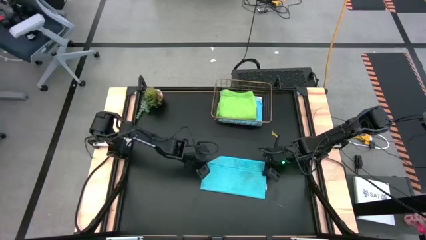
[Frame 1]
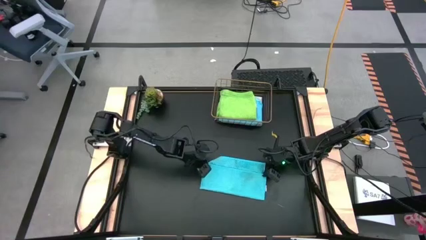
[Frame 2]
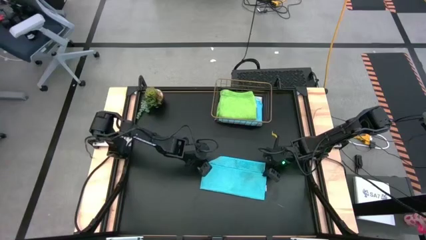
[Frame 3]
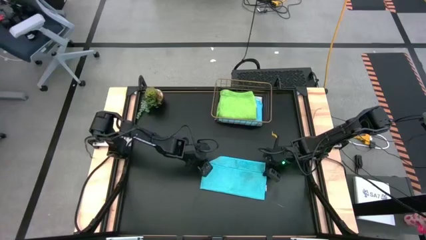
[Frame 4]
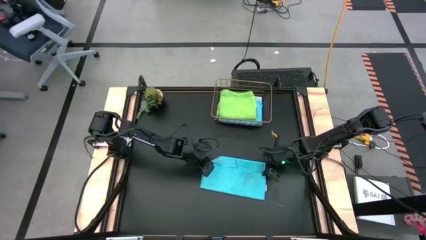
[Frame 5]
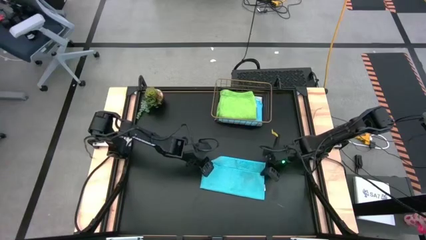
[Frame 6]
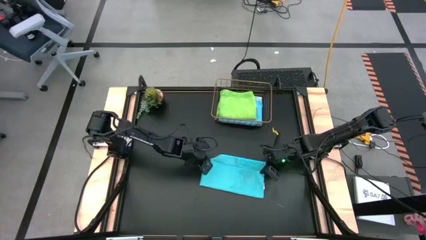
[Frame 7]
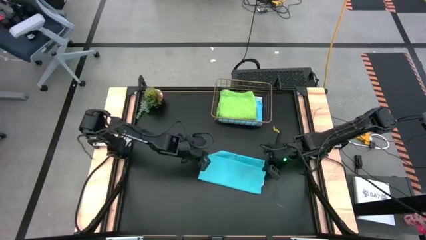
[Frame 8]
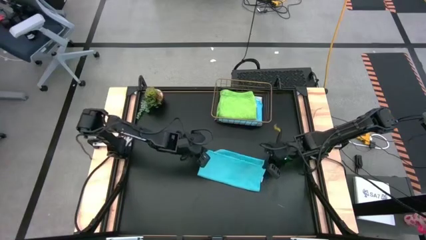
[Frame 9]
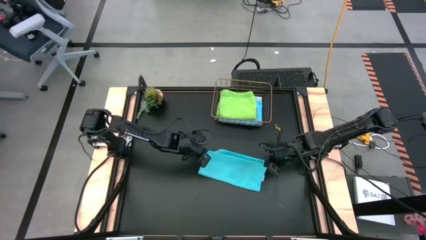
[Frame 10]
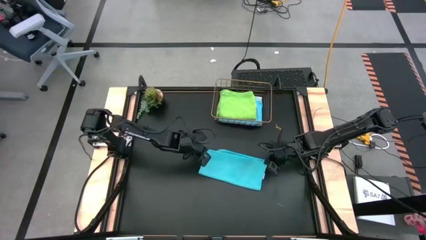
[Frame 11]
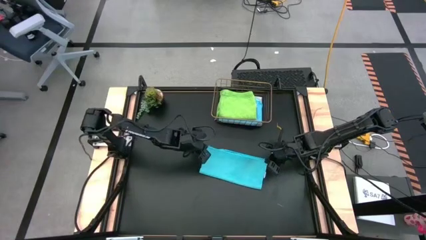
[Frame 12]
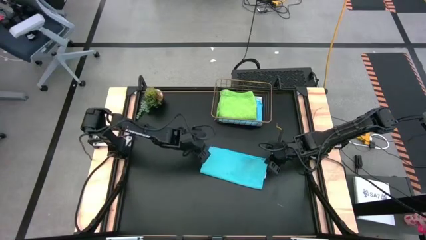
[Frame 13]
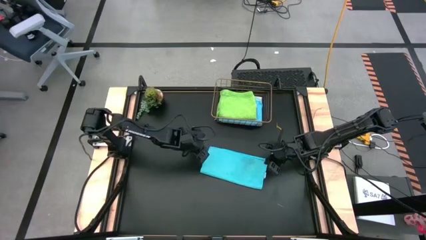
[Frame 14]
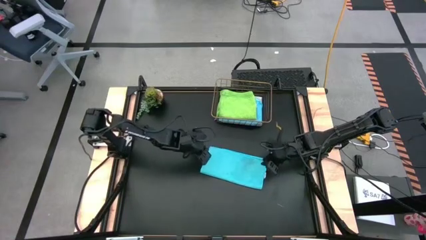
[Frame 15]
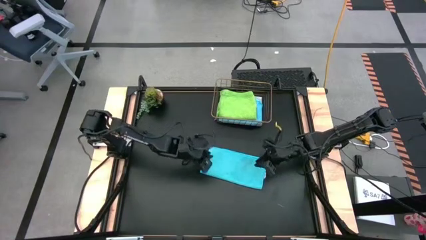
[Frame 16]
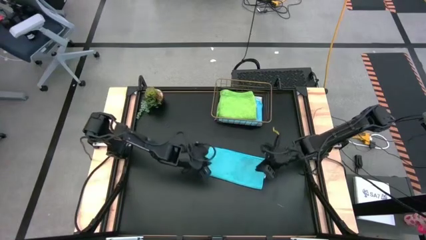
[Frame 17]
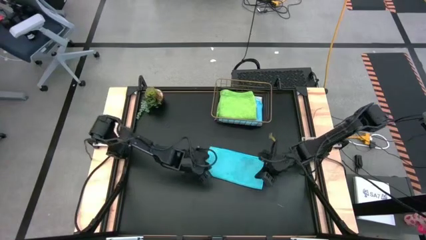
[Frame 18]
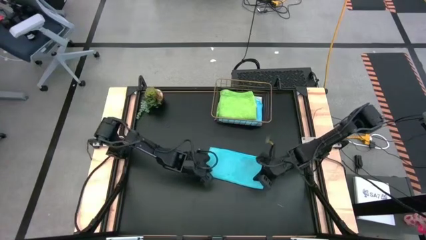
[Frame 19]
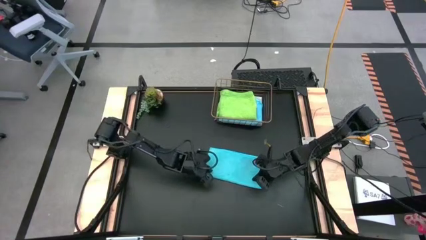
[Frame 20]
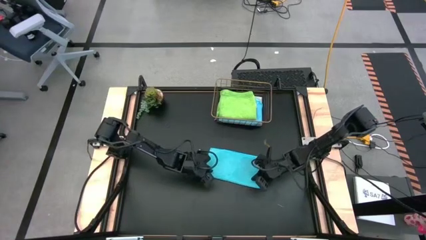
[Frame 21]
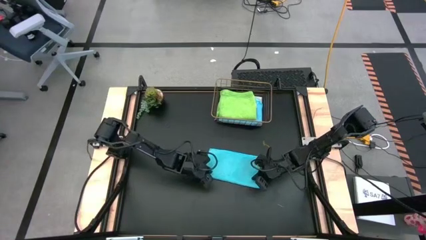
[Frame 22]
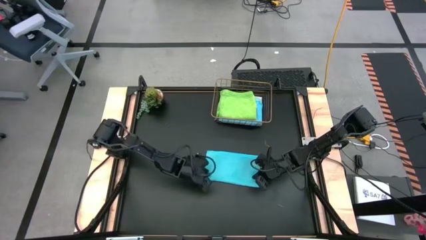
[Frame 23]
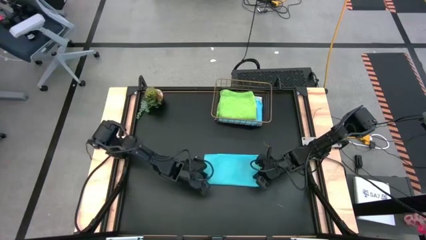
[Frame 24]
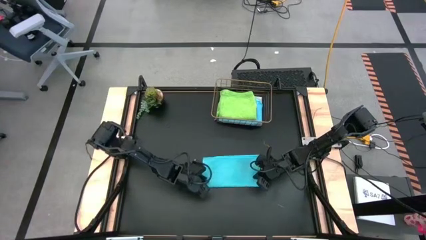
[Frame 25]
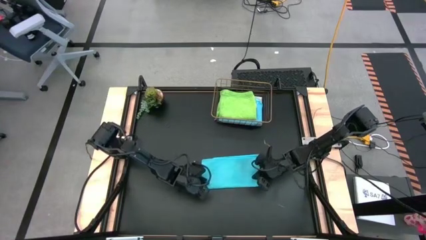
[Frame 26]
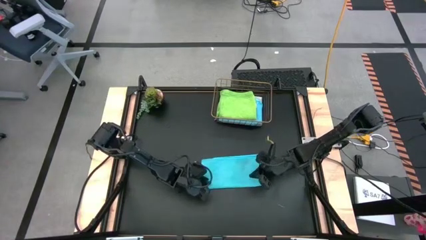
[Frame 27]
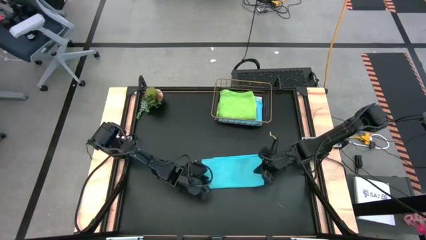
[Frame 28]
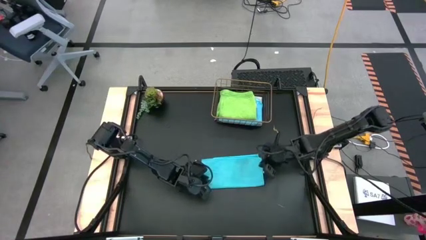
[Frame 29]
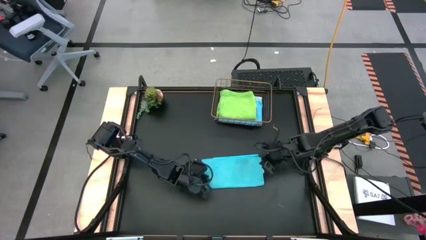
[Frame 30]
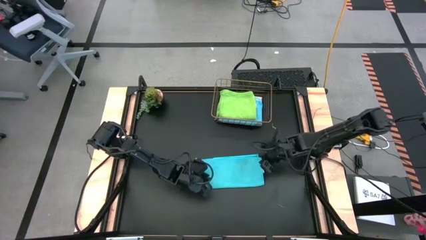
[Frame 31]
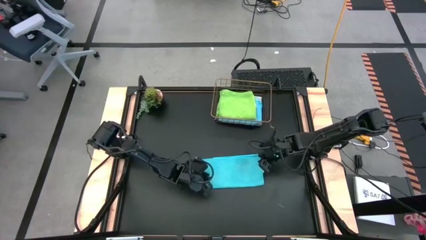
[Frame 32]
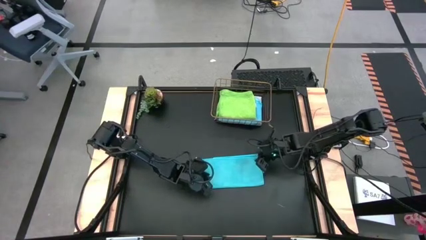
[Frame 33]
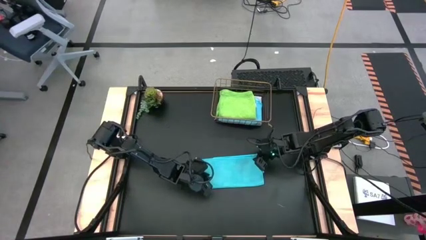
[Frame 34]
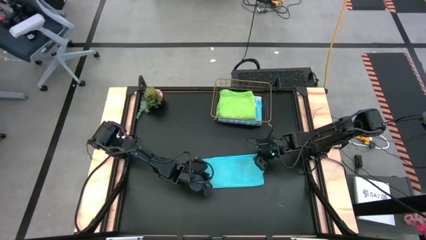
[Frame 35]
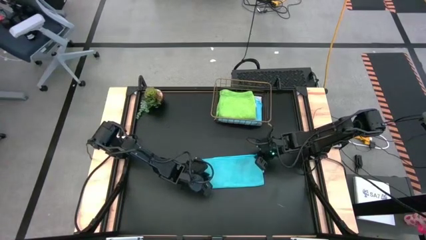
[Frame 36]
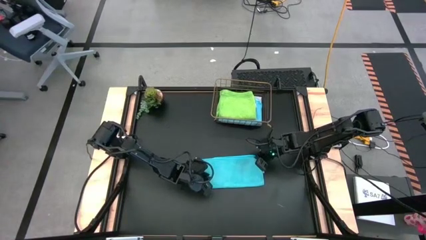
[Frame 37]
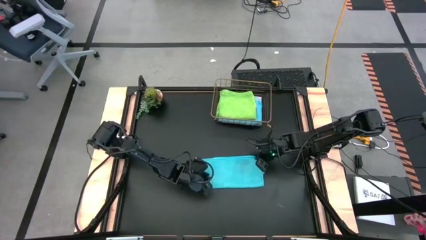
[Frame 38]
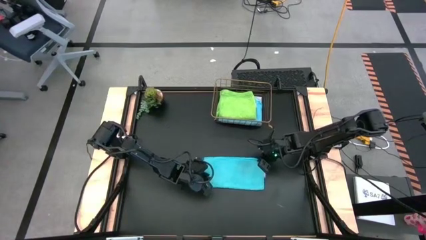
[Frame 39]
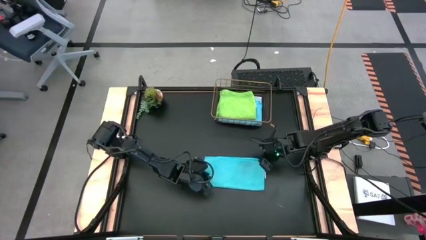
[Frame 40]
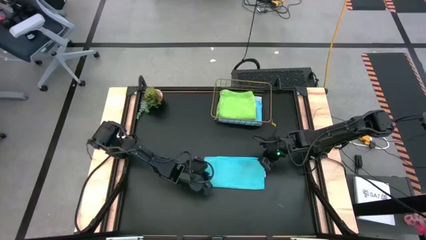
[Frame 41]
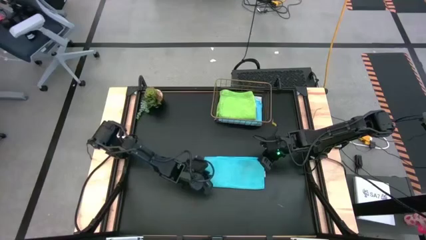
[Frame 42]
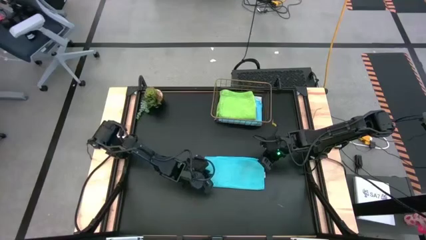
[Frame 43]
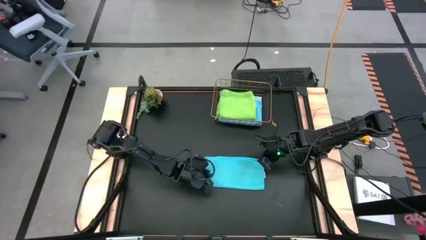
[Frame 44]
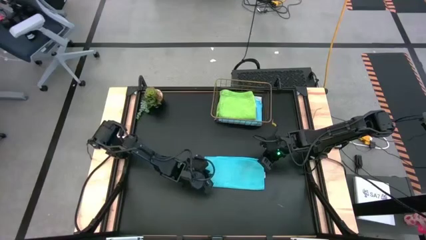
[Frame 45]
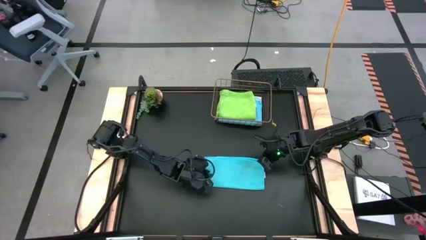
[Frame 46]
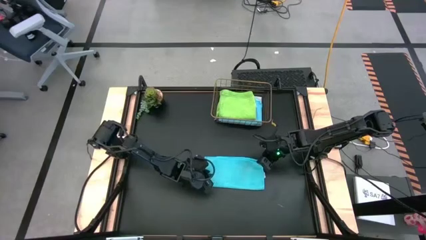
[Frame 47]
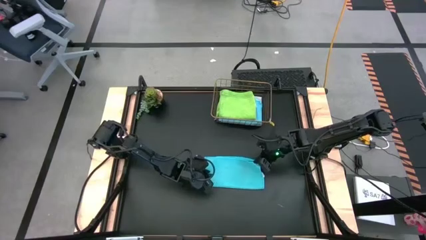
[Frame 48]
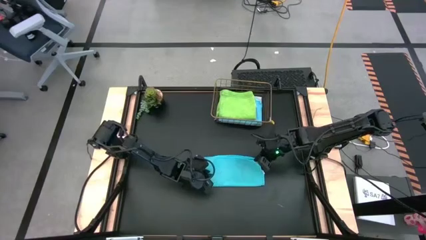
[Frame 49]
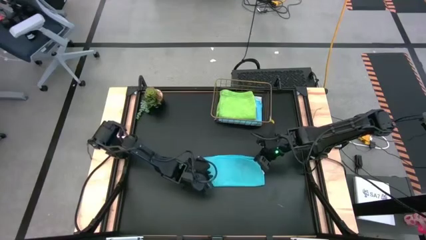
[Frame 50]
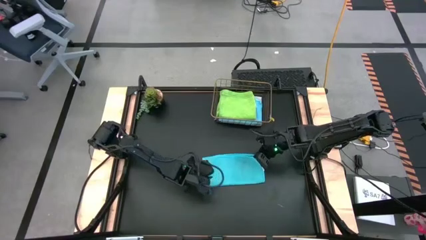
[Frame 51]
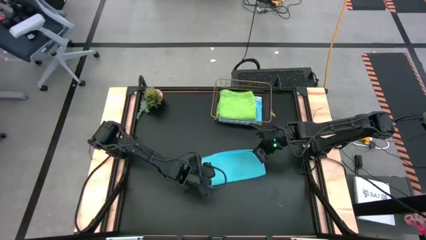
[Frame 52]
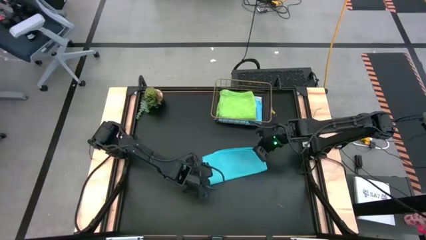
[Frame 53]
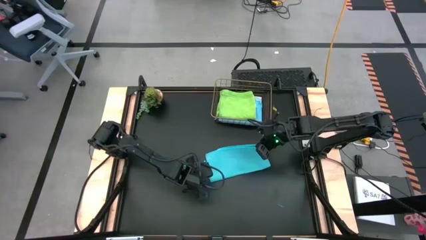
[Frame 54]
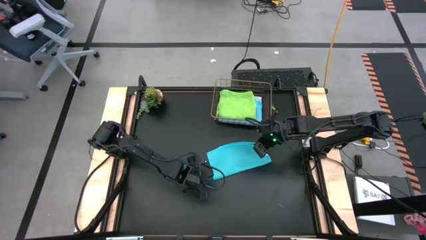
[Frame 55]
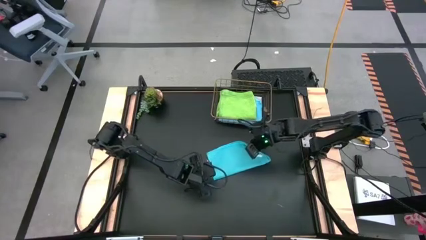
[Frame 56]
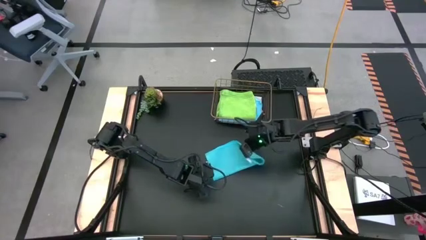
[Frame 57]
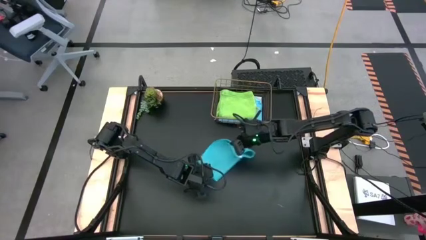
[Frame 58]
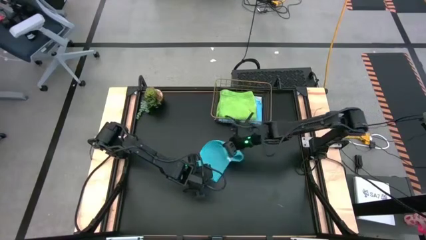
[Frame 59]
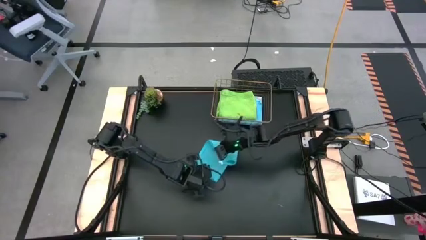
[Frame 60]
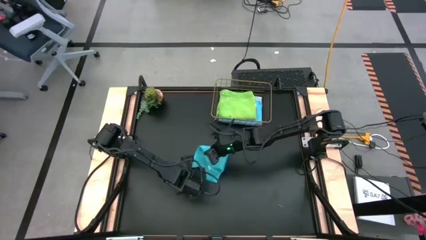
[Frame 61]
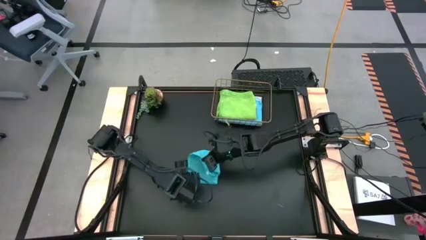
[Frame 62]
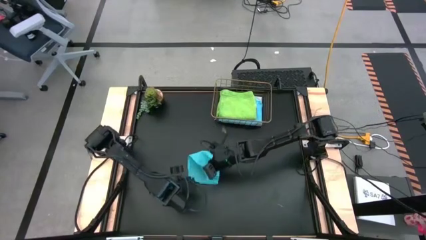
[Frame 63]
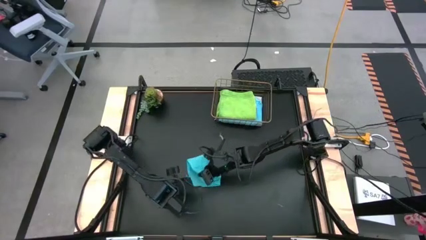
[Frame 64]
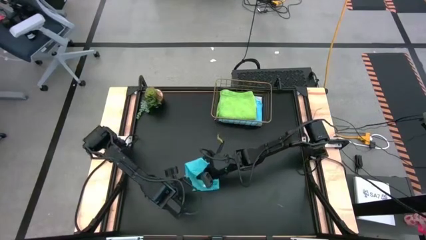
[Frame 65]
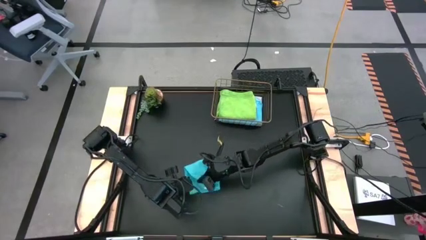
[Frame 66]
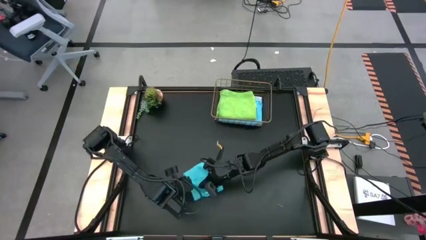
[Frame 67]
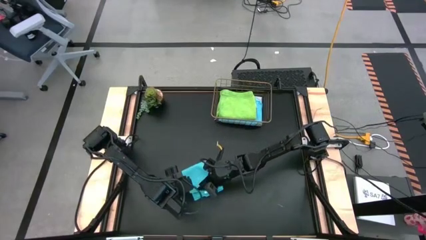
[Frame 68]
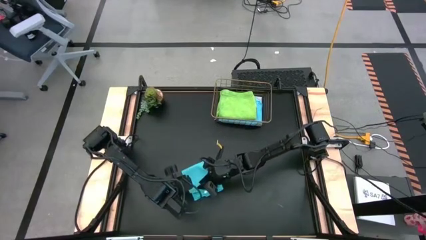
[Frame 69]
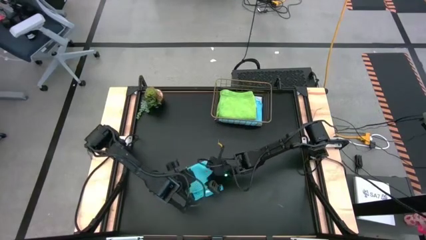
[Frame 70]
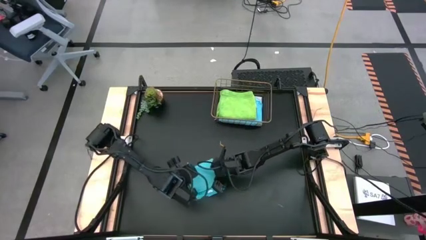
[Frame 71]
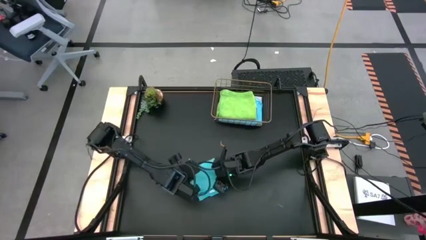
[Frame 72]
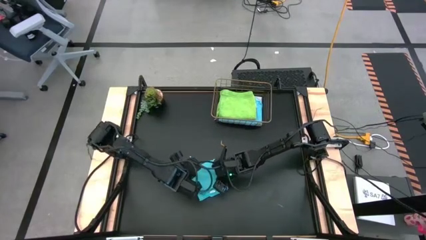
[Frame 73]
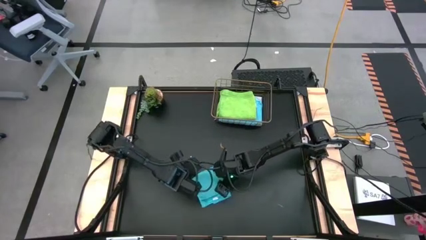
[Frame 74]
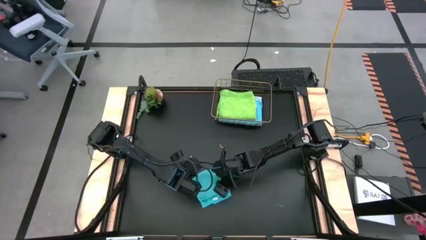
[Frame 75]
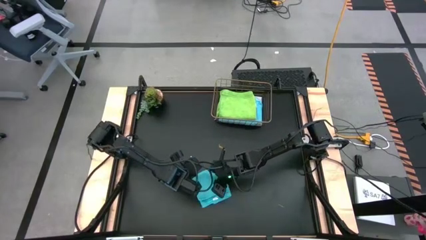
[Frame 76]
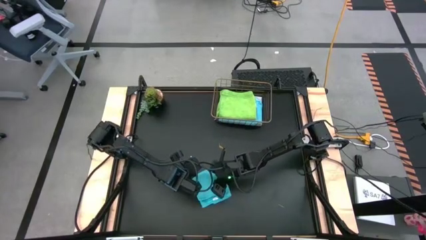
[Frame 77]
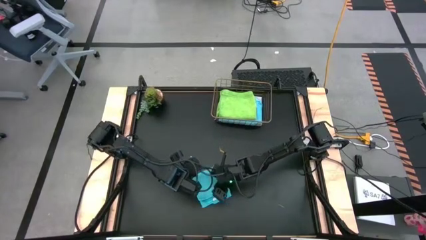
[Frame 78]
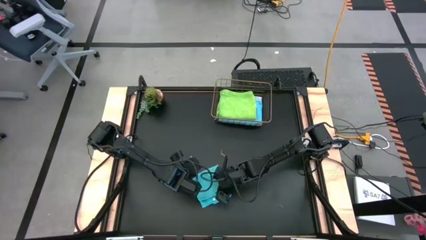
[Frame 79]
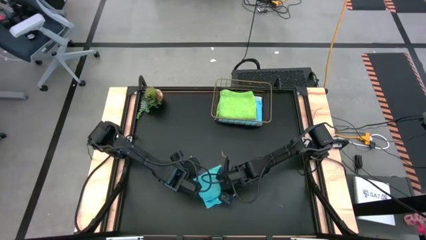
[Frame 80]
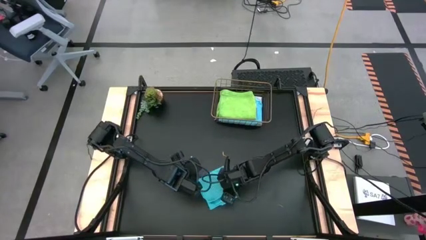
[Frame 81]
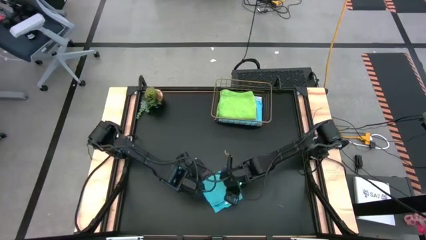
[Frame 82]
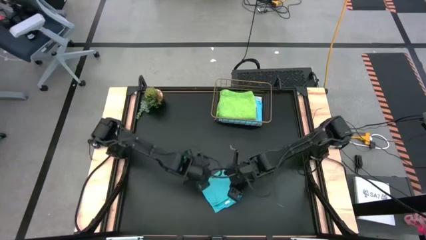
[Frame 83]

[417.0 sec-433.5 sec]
Task: Fold microfiber towels
Fold the blue towel
